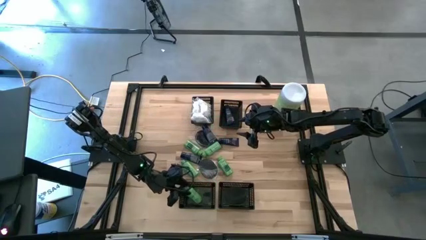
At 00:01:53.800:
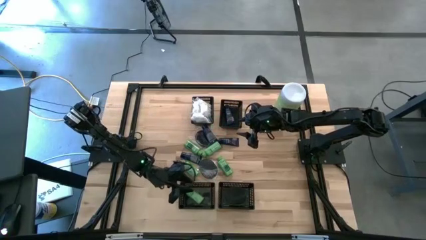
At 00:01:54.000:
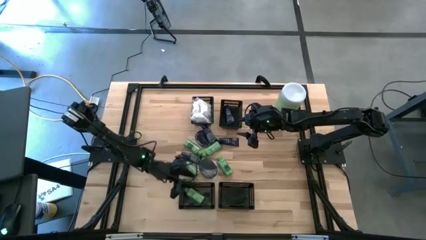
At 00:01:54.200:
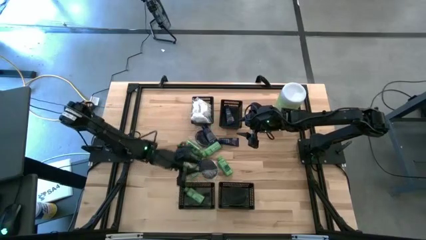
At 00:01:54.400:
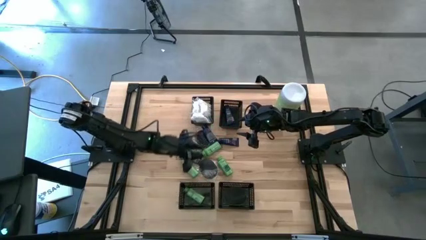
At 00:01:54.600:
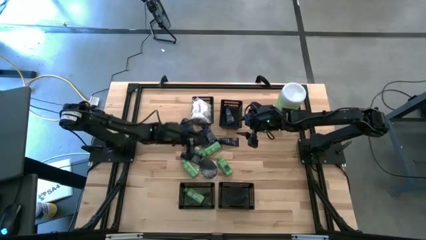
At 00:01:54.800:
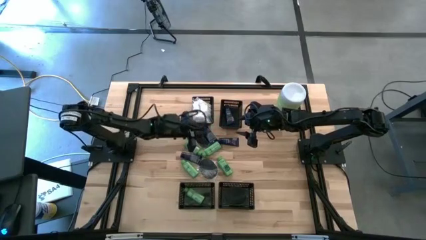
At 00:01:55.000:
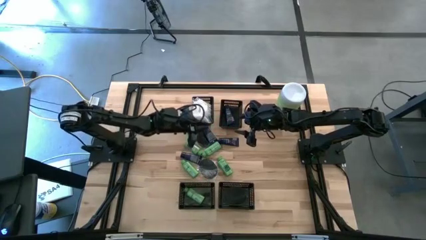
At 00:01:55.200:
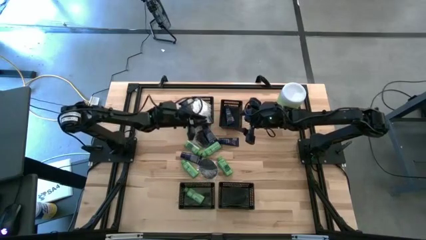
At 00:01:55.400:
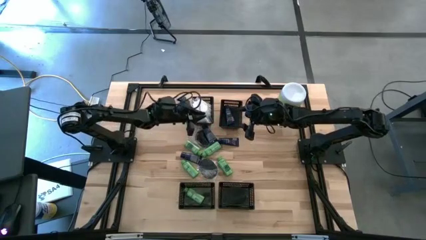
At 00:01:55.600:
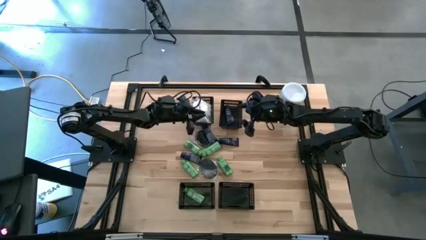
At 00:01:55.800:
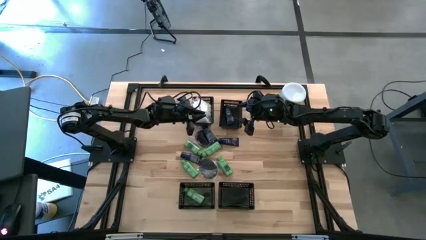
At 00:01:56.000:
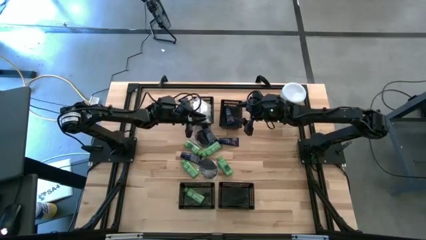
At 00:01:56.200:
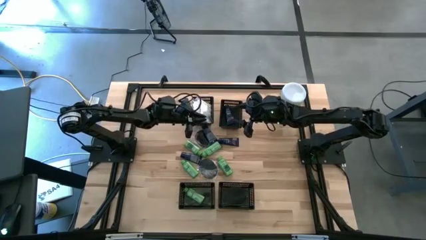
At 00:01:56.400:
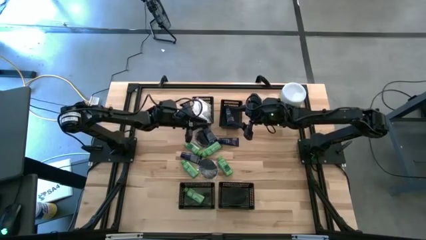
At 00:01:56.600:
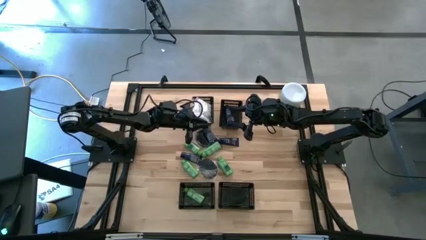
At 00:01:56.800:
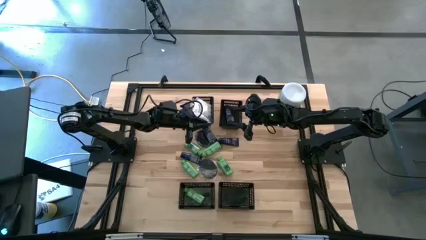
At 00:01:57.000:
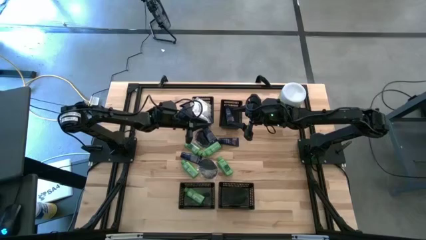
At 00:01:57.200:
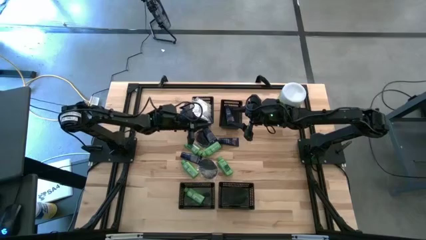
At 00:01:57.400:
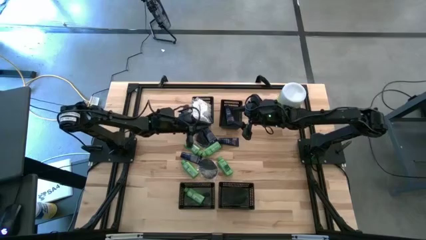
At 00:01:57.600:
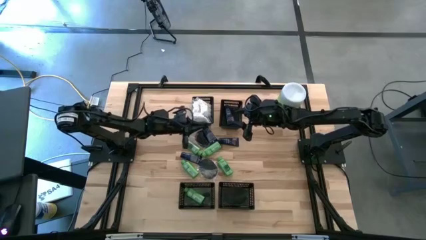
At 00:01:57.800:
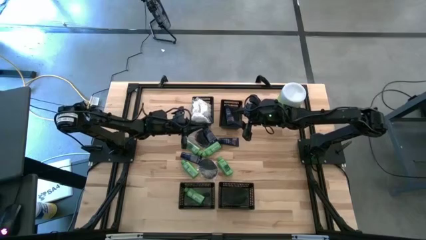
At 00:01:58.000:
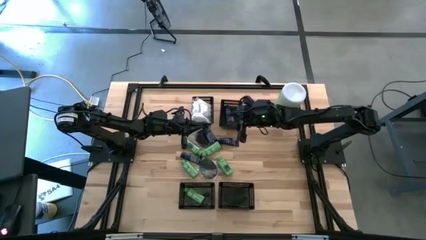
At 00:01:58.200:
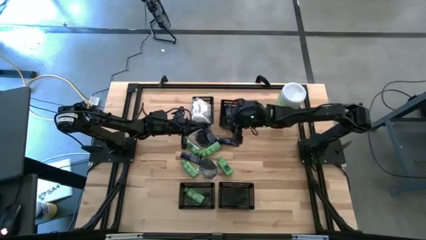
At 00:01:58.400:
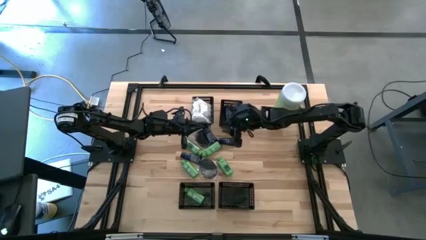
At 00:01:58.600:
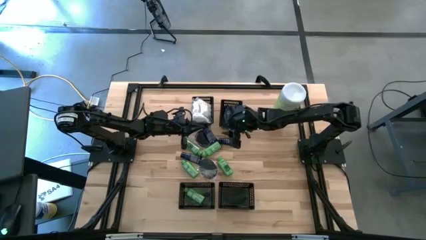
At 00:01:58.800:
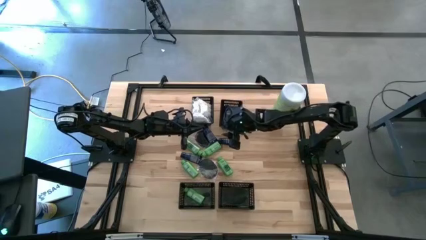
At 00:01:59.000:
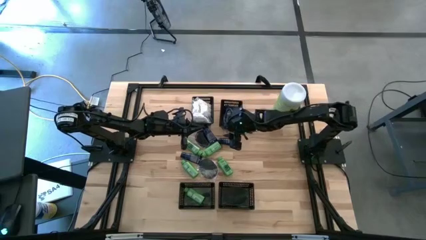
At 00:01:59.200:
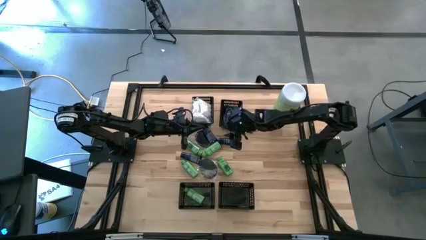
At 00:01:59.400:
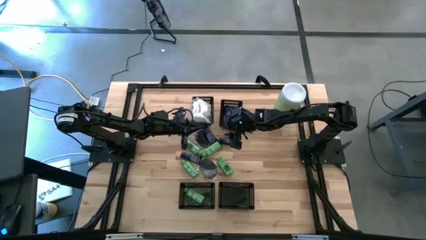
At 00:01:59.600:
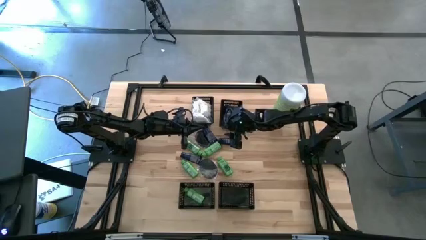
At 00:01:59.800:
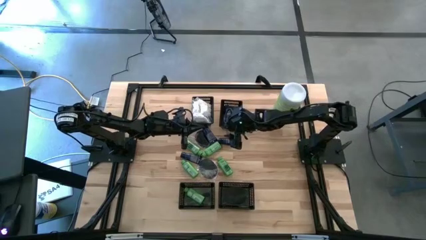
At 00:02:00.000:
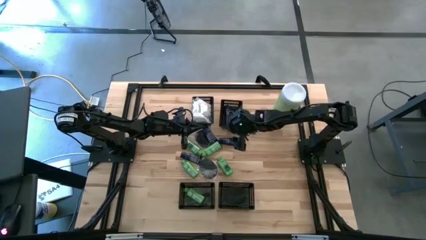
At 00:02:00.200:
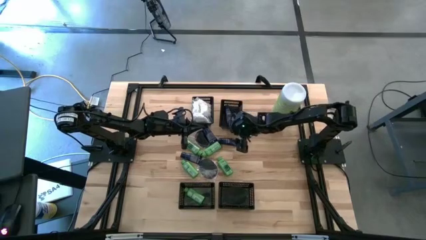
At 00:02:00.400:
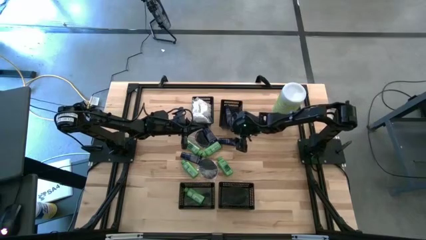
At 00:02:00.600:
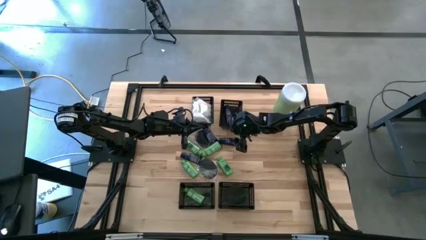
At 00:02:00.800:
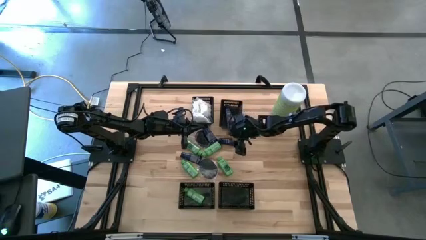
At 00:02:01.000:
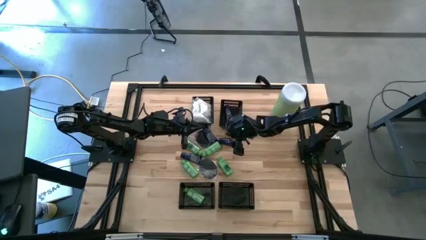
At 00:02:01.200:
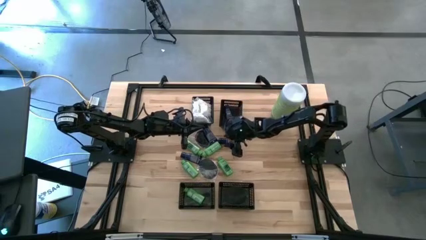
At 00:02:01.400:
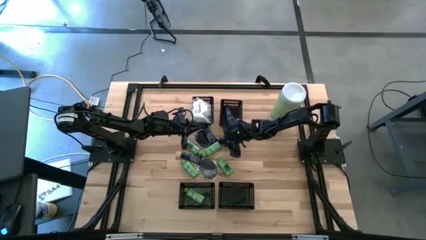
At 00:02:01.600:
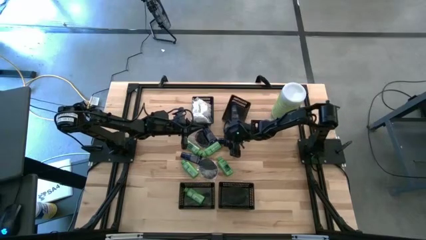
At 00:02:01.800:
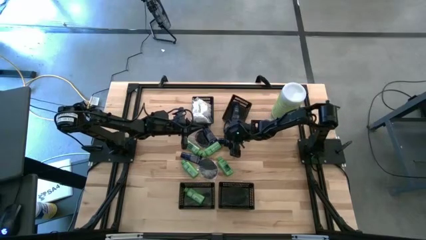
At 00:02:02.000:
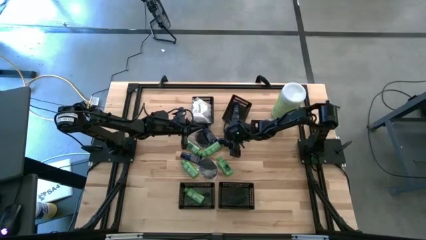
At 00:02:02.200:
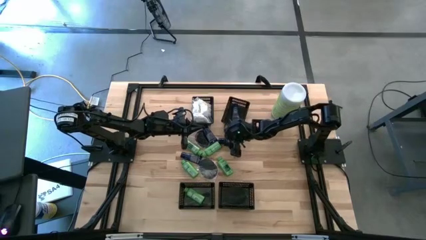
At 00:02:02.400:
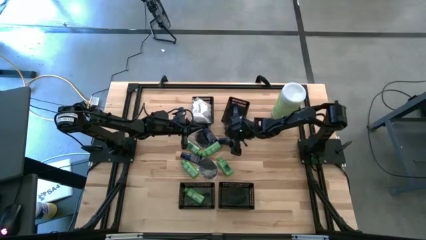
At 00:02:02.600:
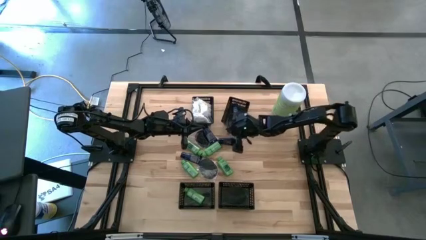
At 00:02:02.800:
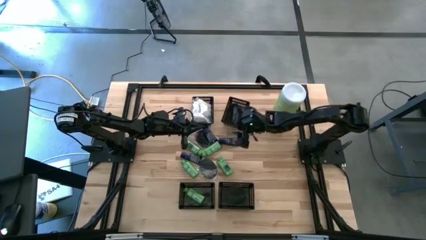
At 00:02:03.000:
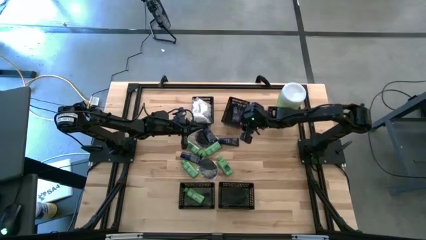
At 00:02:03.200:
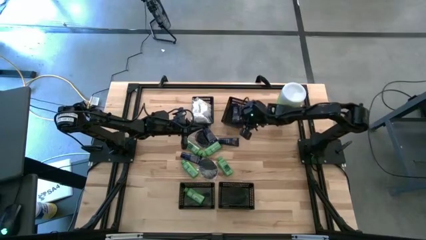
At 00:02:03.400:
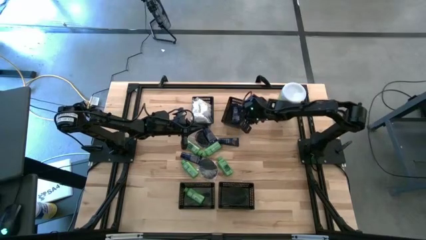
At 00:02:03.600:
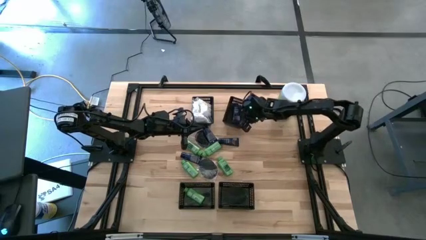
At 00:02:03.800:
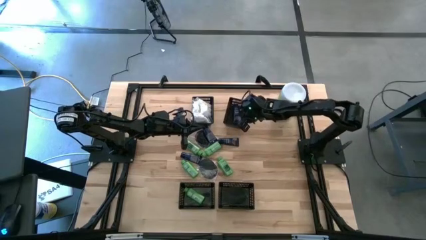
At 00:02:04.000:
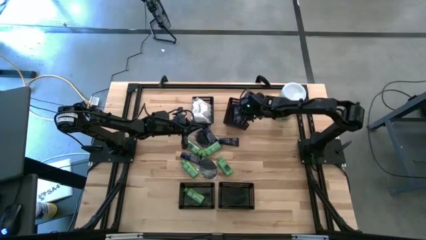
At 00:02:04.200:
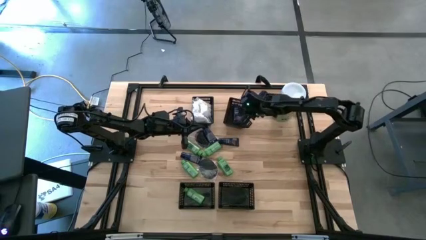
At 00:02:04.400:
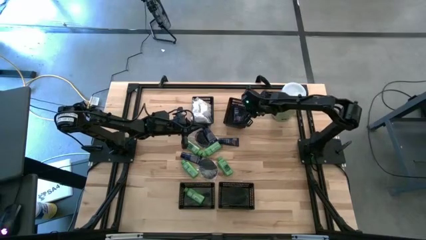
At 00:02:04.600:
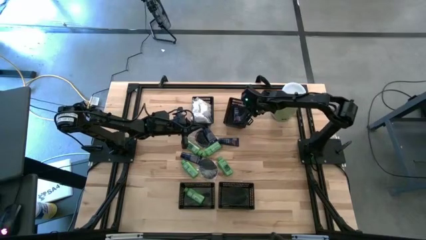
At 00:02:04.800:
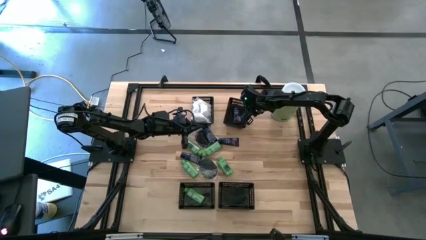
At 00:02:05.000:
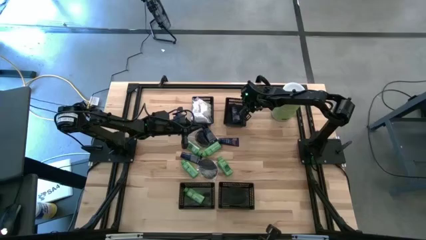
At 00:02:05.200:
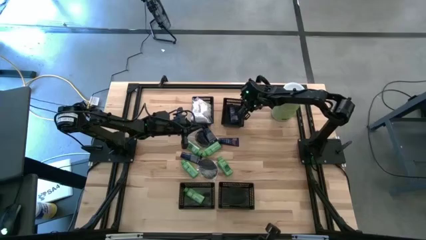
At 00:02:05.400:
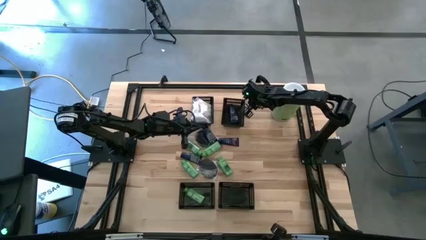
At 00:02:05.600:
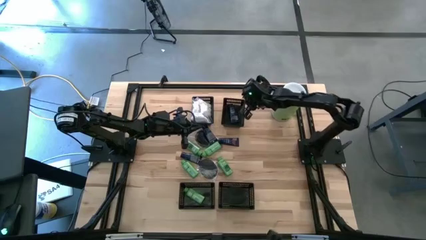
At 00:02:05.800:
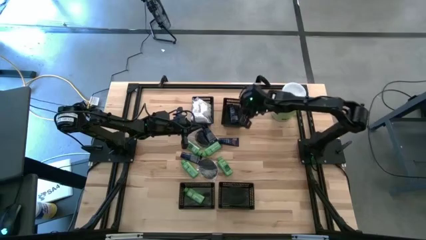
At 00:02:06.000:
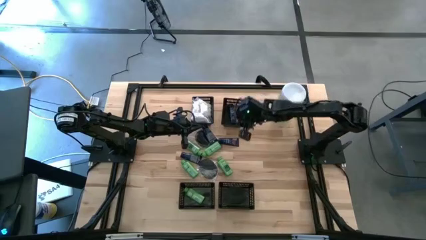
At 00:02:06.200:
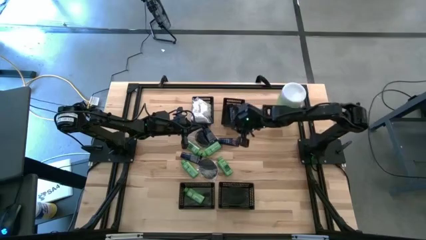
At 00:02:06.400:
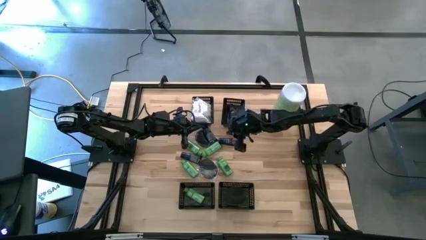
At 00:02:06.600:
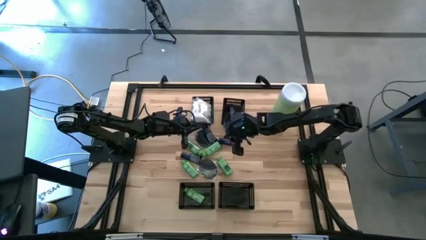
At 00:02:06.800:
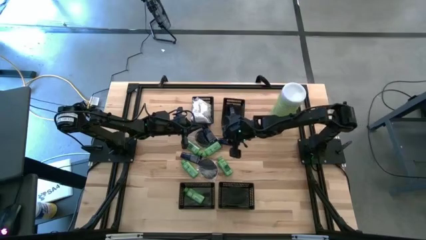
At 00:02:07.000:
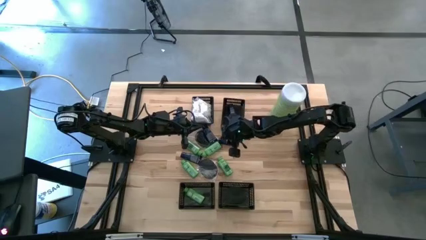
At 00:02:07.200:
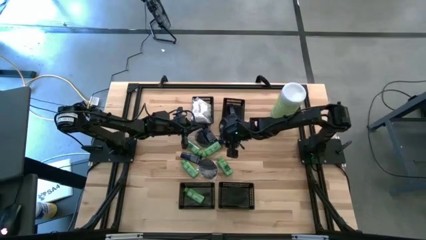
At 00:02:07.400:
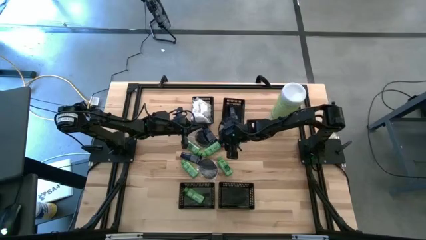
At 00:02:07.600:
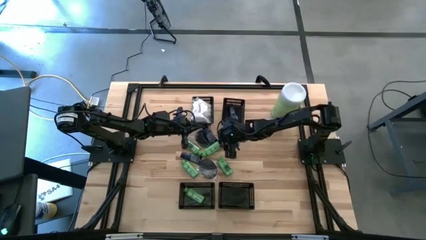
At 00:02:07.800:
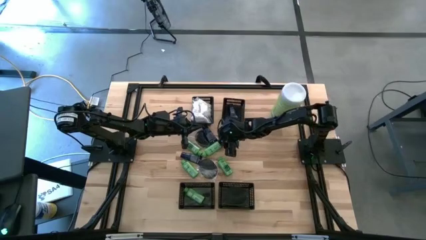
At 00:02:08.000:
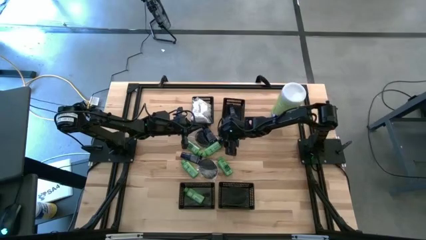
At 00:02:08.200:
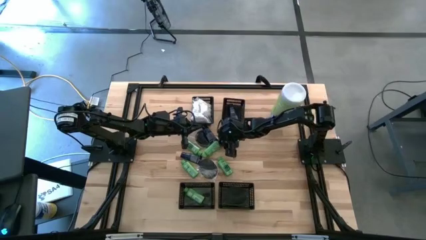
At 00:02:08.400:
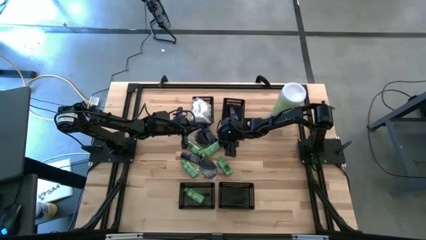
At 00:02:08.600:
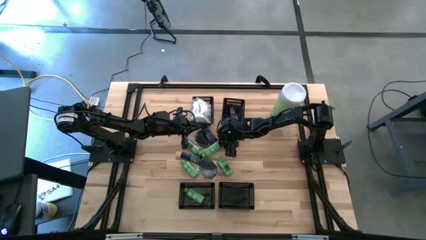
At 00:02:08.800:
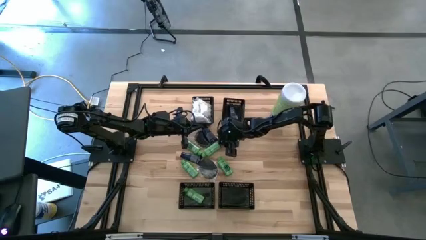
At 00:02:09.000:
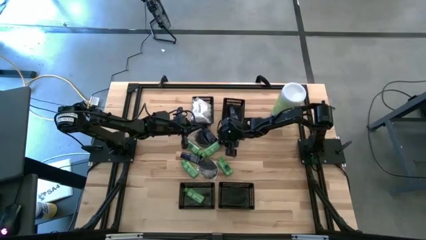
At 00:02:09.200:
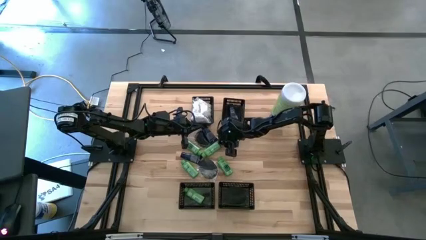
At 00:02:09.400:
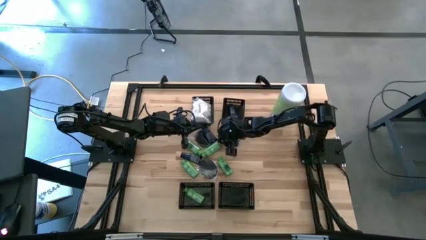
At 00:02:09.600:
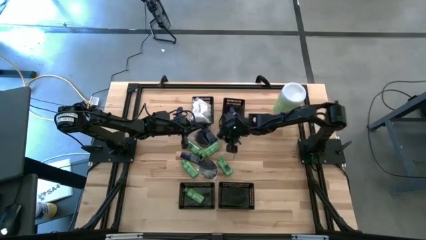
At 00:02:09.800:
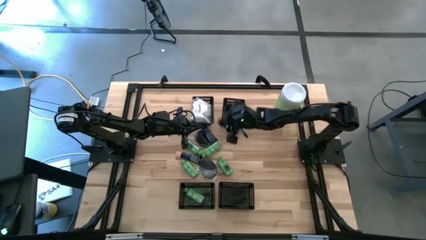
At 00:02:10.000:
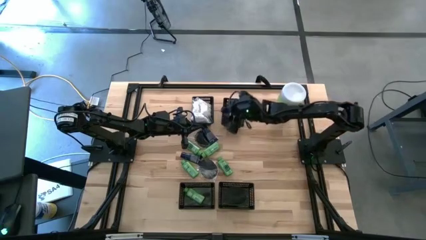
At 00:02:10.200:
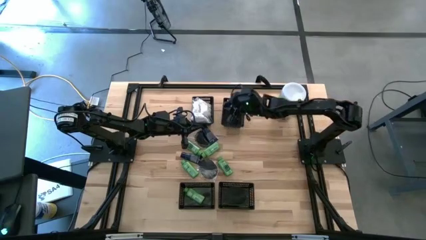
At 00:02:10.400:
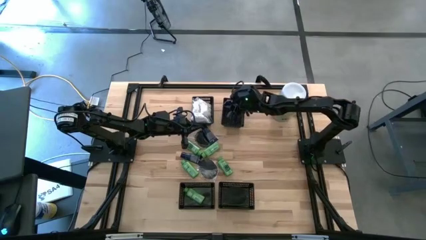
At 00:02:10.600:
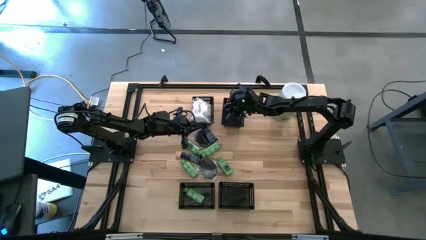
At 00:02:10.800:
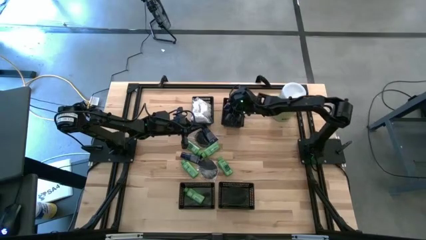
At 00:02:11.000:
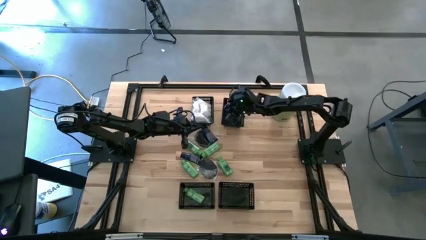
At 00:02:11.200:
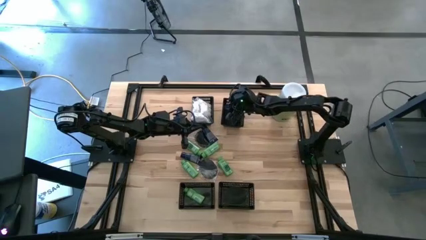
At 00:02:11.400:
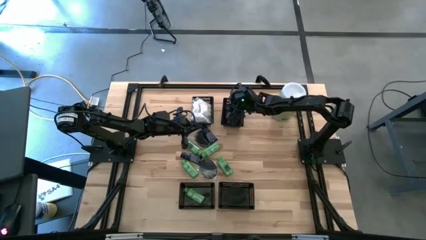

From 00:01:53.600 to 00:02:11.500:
Task: Pick & Place Travel size toiletries
Put the blue shave cream into the top right black bin
